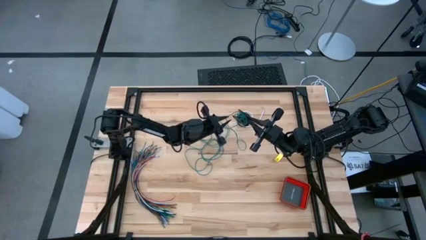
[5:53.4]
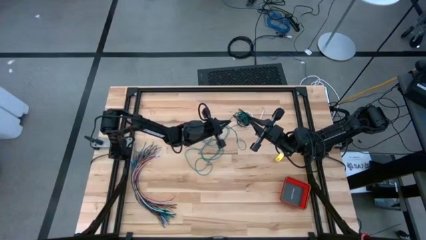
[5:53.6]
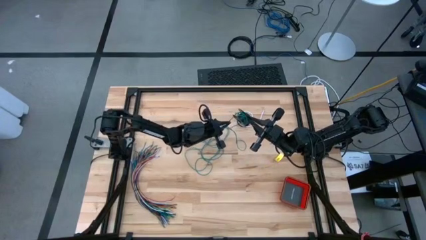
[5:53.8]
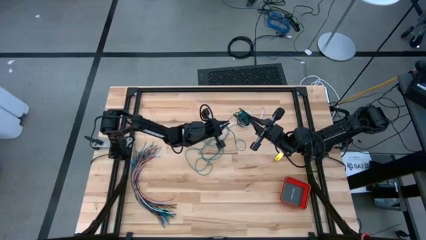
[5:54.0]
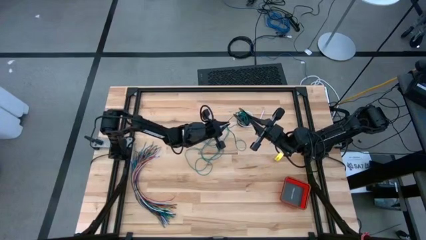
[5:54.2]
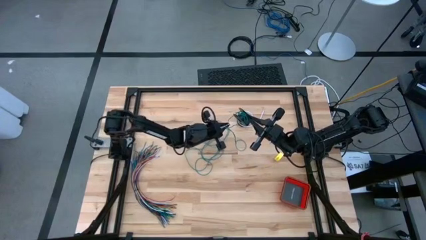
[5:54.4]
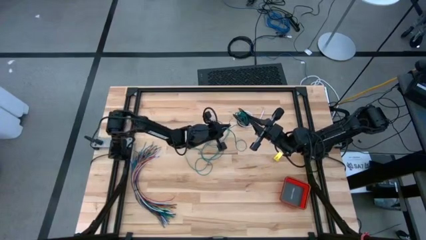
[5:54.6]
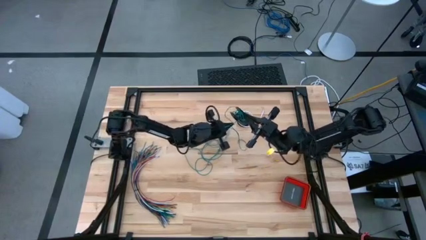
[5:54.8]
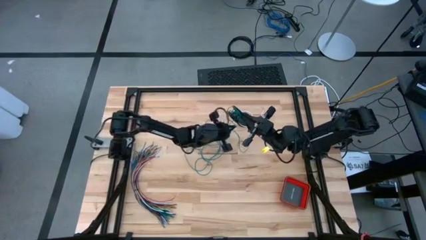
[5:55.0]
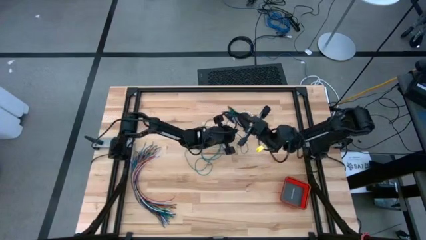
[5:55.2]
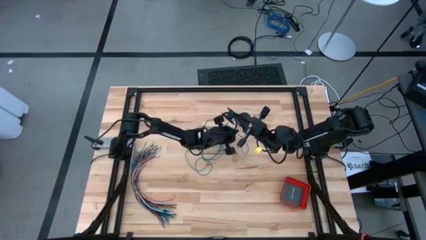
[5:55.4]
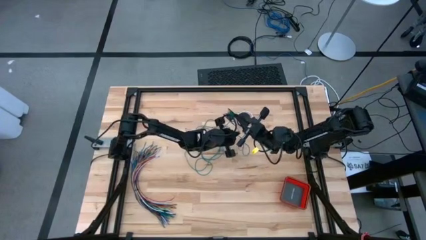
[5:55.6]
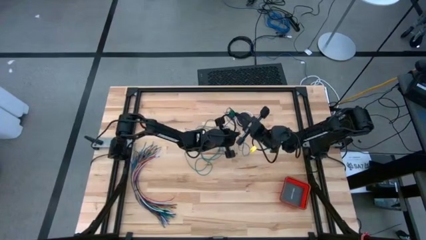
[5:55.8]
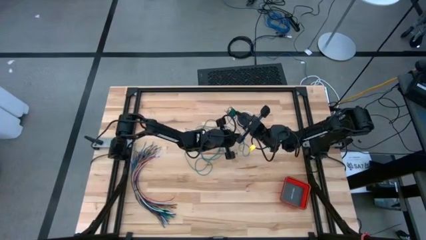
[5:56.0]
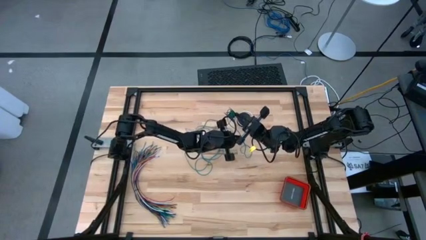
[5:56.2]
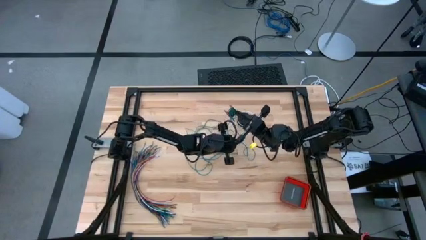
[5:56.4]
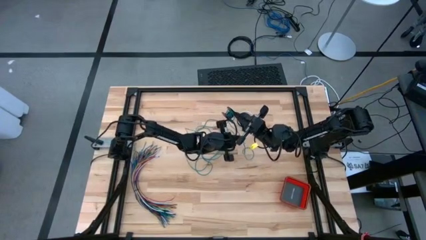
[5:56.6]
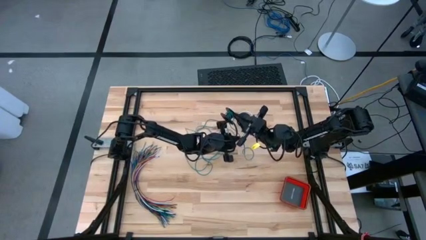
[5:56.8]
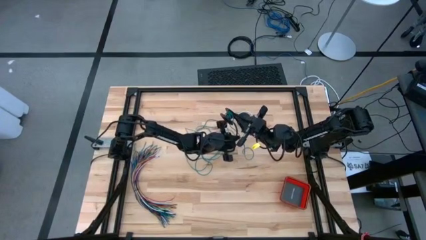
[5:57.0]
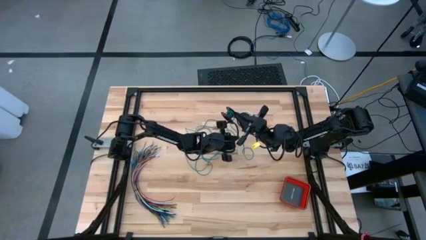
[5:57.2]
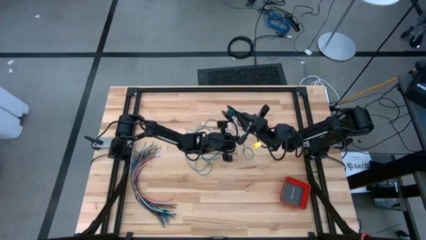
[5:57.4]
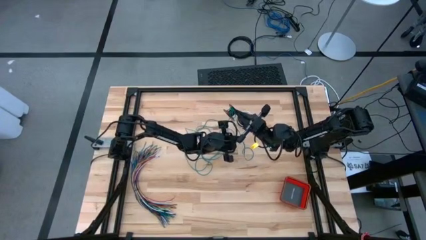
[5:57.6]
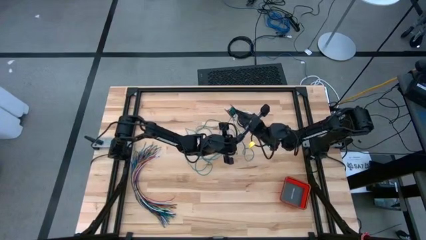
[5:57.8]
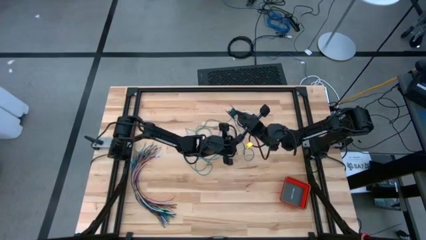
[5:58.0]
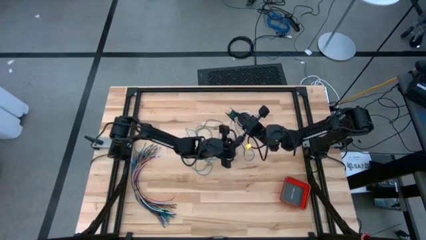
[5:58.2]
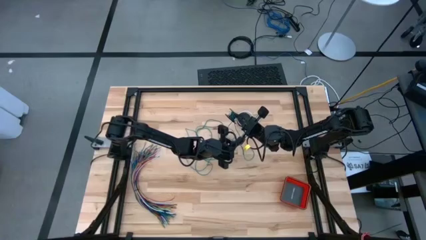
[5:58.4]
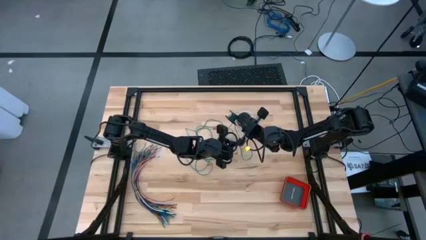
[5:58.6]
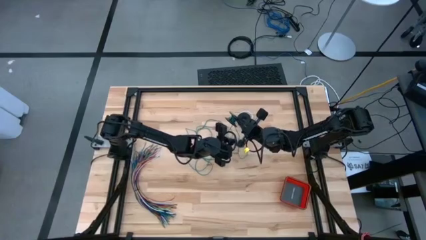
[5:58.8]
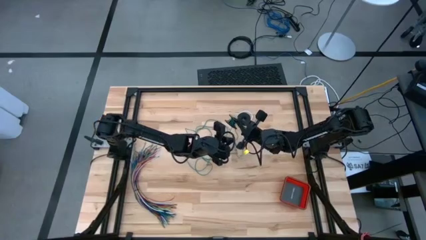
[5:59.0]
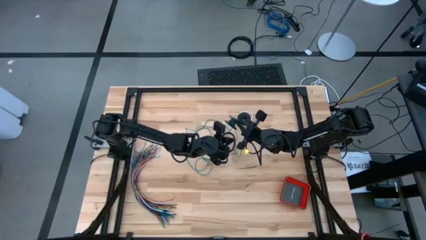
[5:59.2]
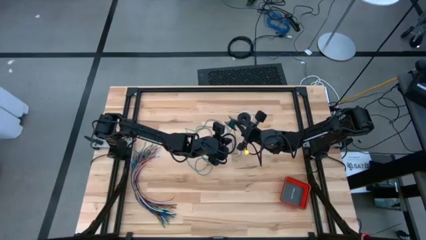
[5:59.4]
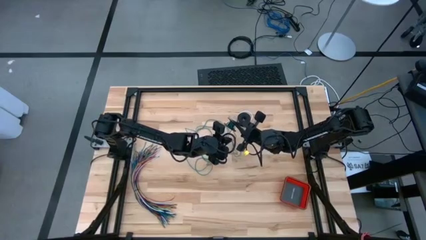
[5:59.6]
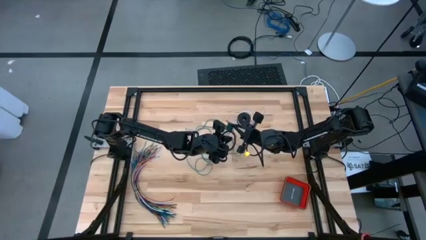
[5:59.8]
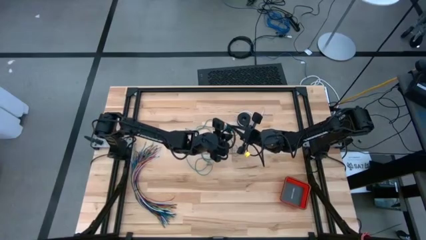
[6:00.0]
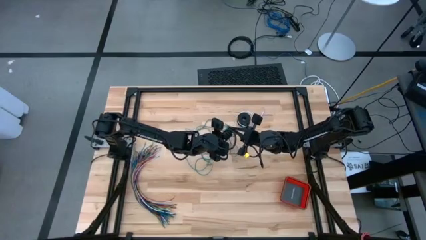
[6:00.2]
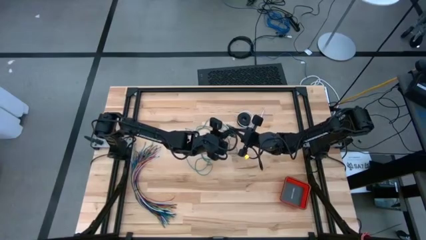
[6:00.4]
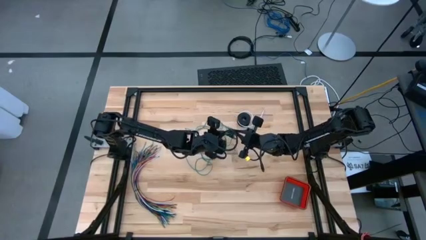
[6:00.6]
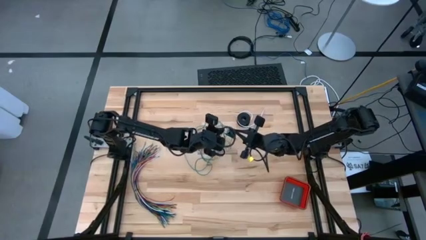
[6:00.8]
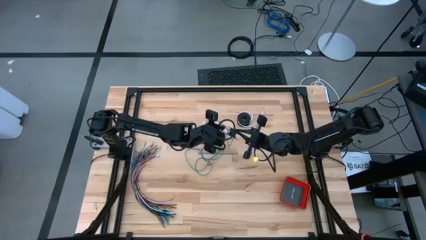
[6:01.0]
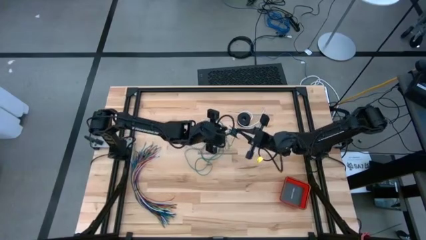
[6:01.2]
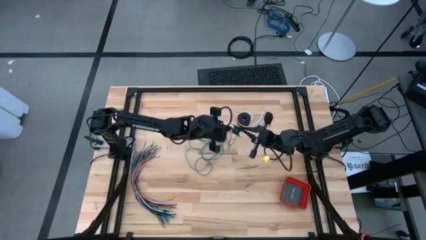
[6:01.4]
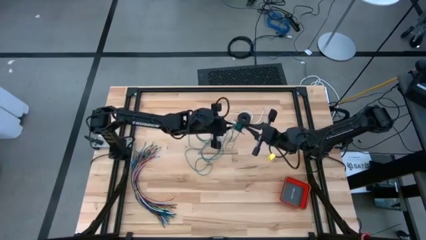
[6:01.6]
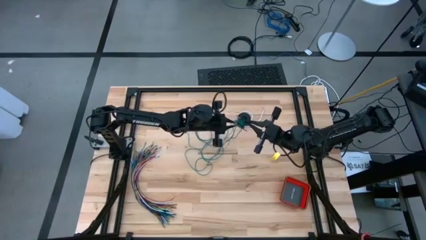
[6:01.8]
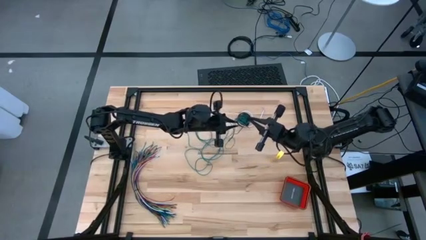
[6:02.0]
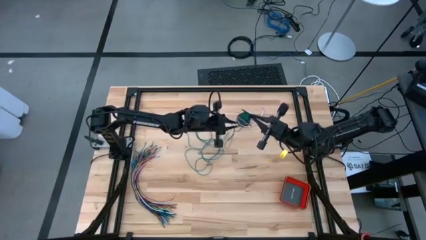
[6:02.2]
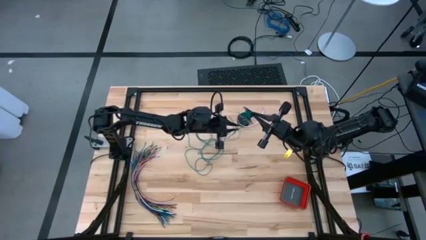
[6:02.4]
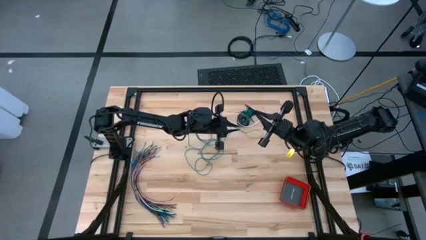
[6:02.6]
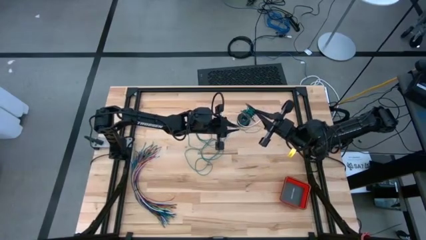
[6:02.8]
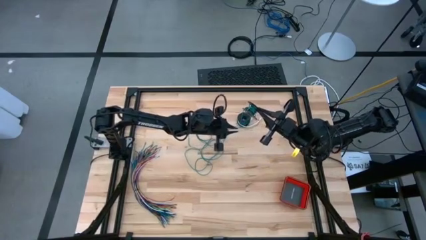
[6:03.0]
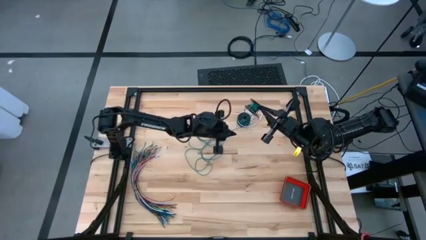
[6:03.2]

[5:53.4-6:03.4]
Task: Coil cords
Coil the green wire onto the spool

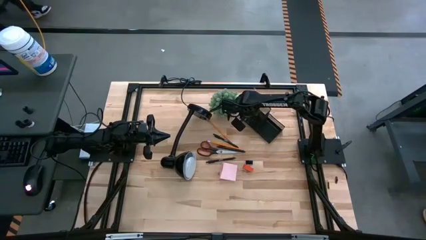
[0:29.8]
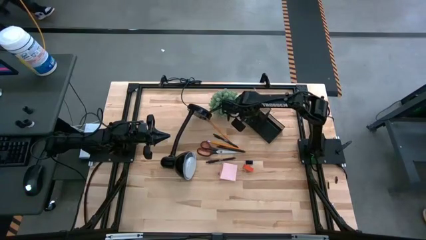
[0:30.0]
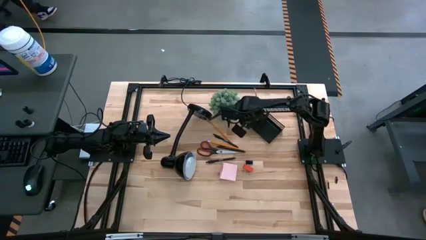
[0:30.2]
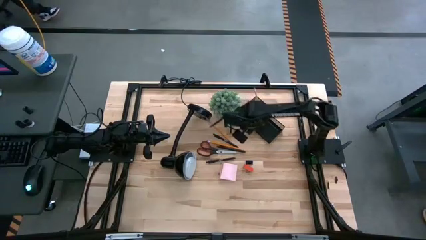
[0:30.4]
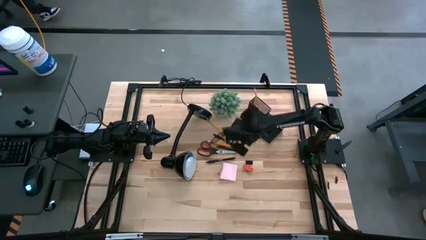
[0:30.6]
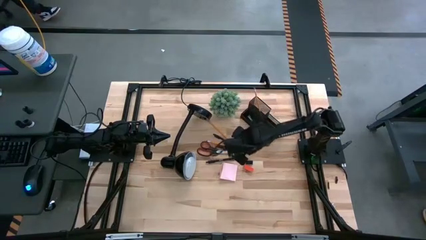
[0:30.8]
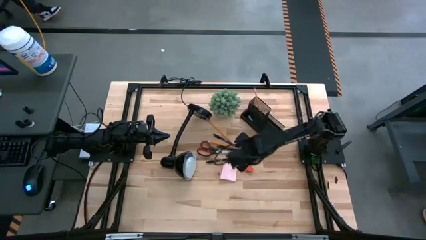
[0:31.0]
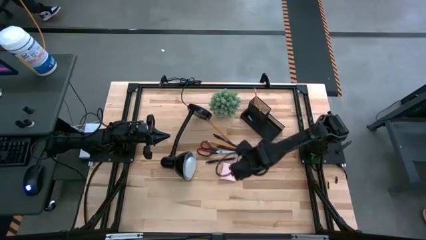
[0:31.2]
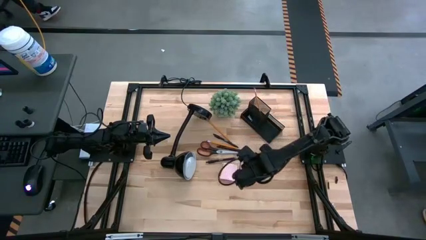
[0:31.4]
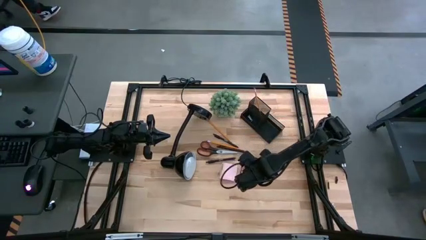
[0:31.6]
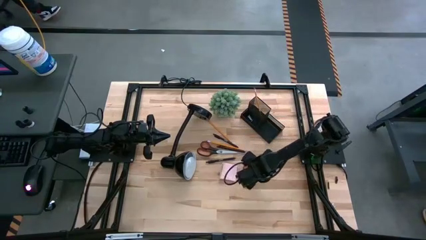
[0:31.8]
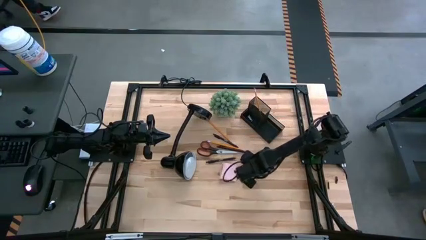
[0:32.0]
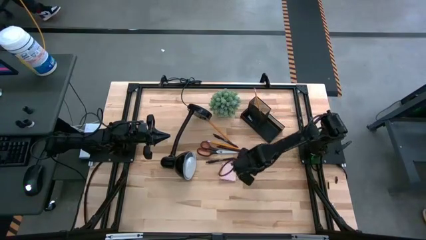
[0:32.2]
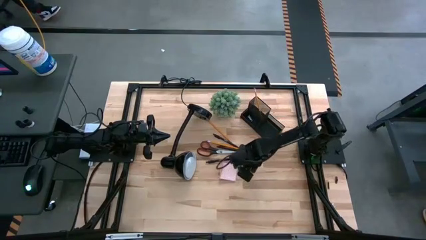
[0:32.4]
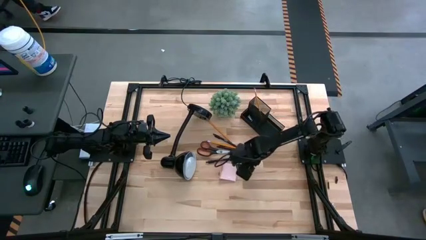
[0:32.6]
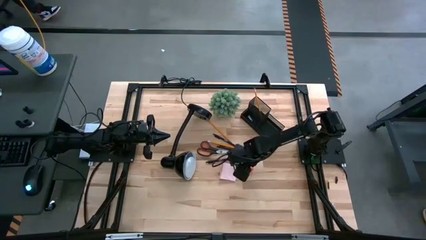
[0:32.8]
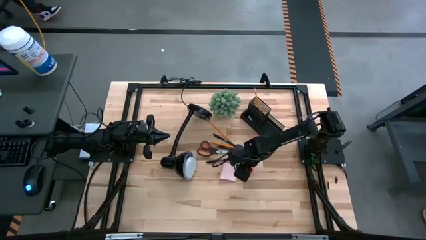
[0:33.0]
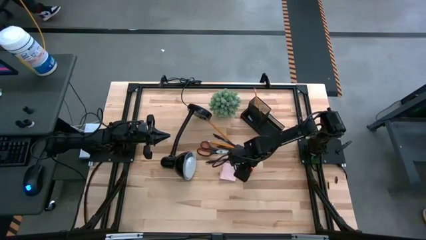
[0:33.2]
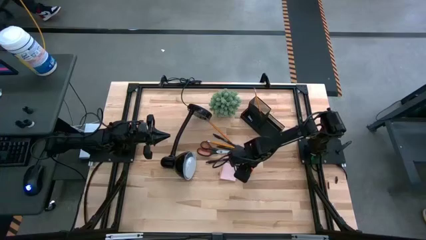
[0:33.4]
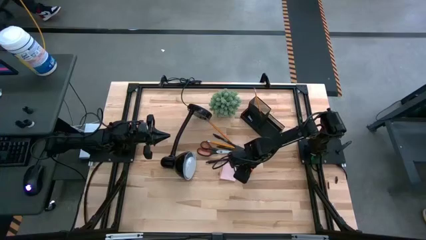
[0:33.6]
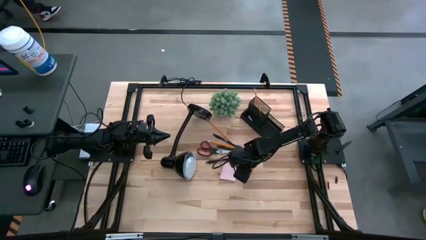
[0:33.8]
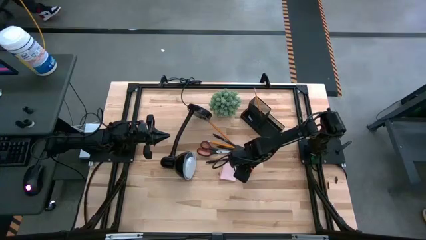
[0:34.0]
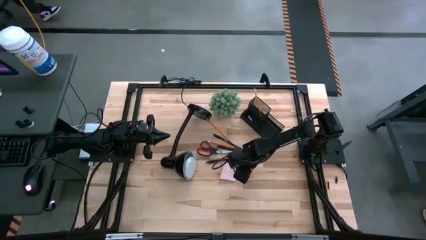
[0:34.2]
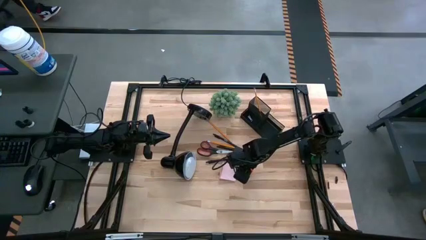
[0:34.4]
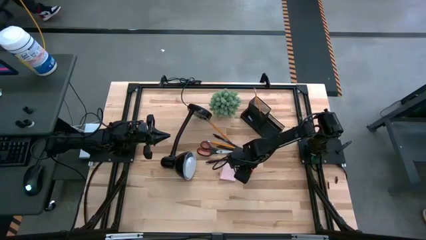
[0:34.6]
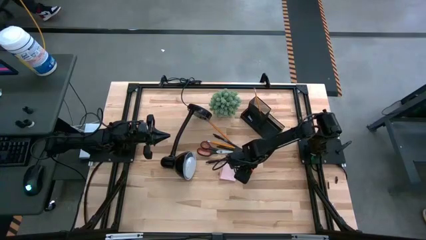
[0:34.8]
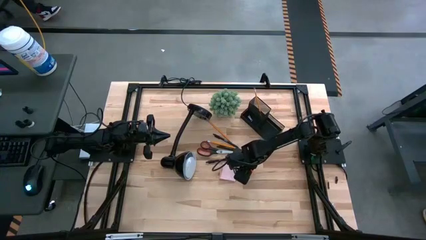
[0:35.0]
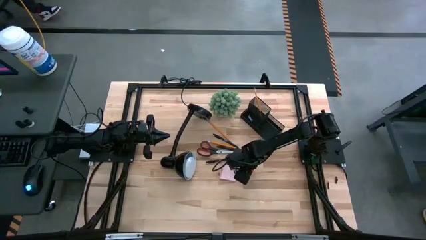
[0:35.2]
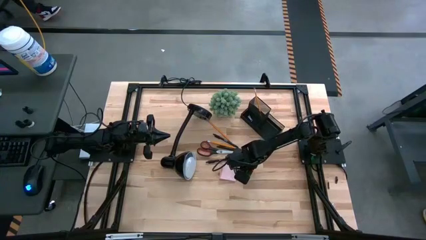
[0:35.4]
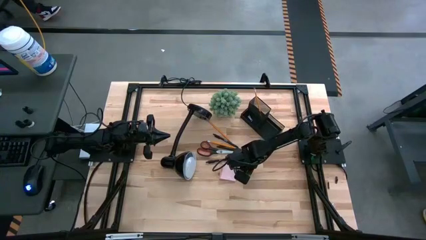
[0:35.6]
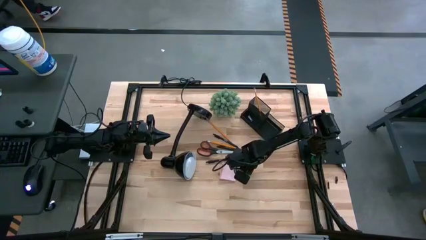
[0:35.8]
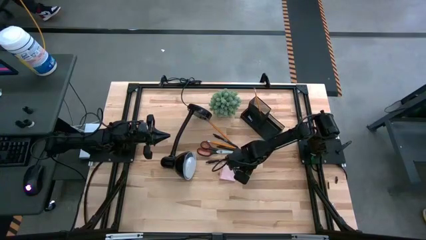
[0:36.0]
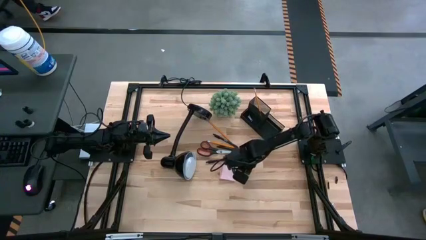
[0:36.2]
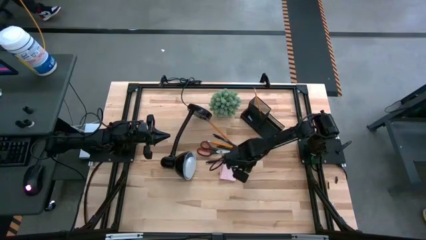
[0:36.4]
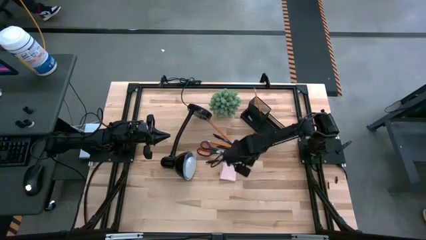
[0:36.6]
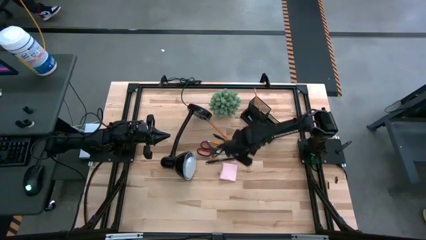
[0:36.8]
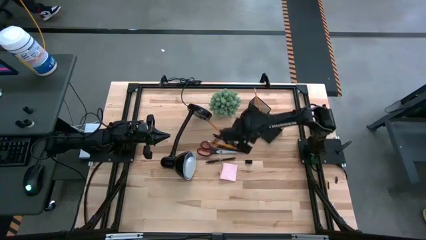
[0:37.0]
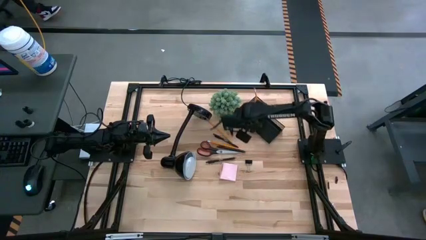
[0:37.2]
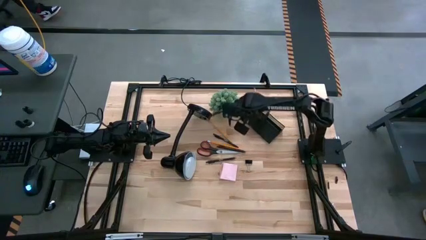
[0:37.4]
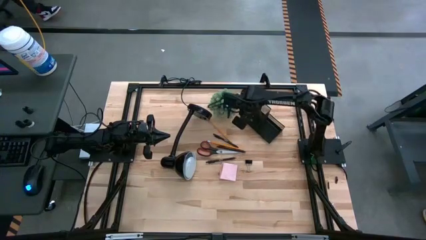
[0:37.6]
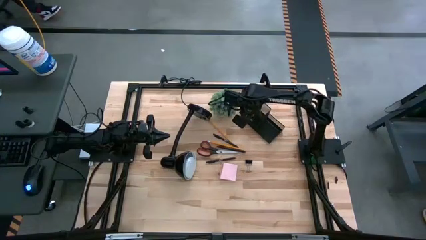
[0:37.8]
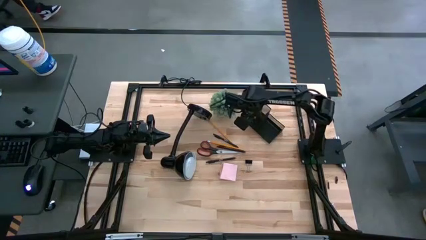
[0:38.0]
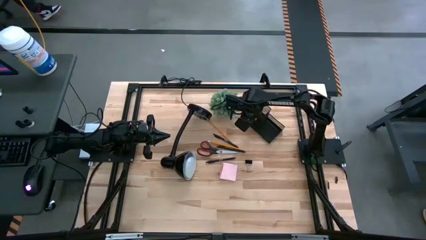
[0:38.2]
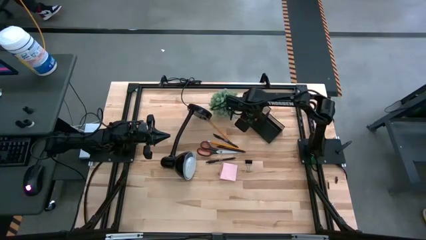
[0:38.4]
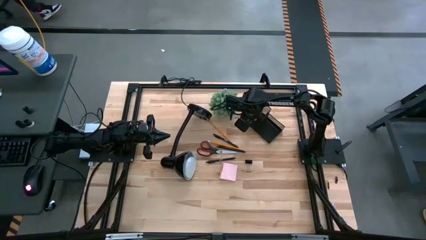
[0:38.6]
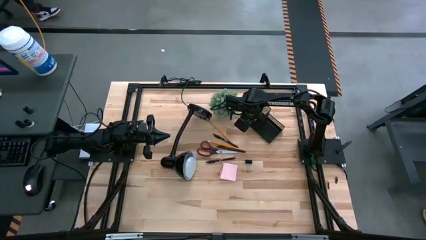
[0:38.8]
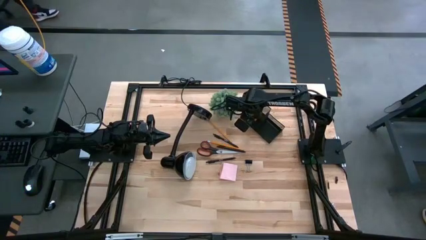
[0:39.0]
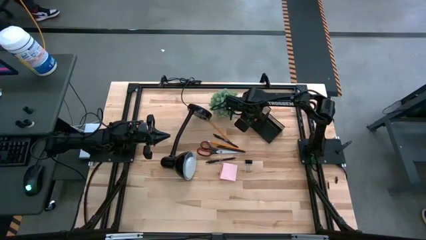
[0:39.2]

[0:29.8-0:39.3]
Task: Pick and place office supplies into organizer
Put the eraser into the bottom left section of the desk organizer
